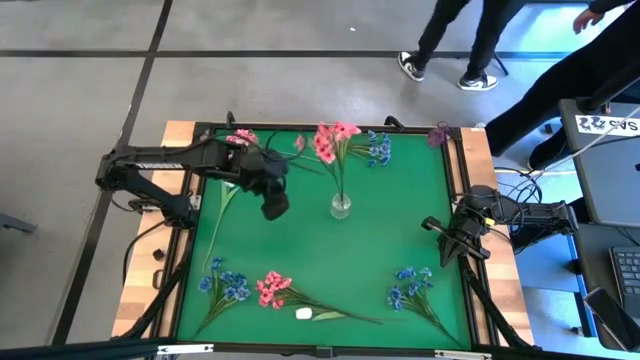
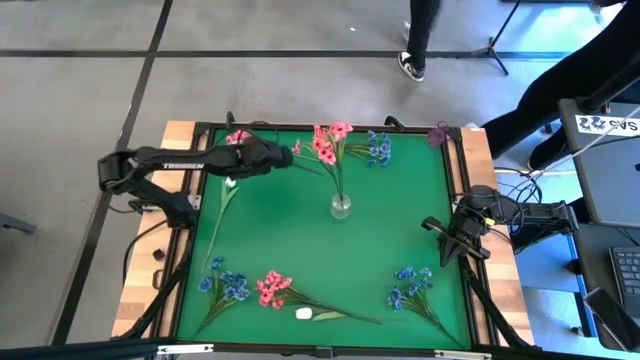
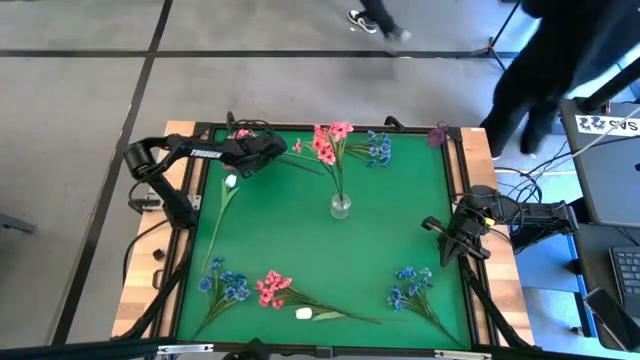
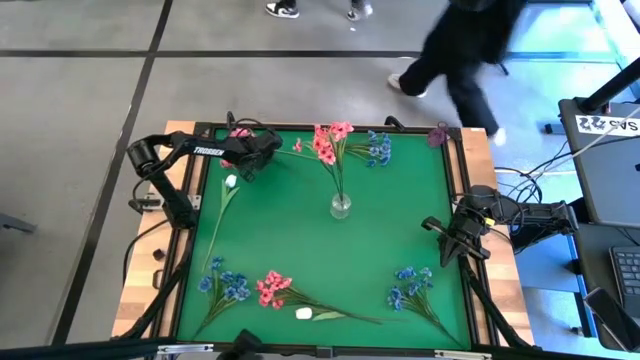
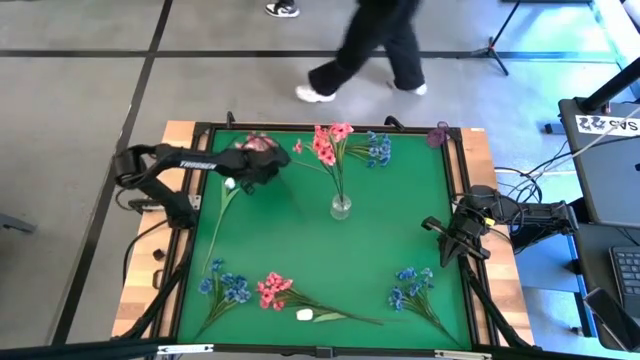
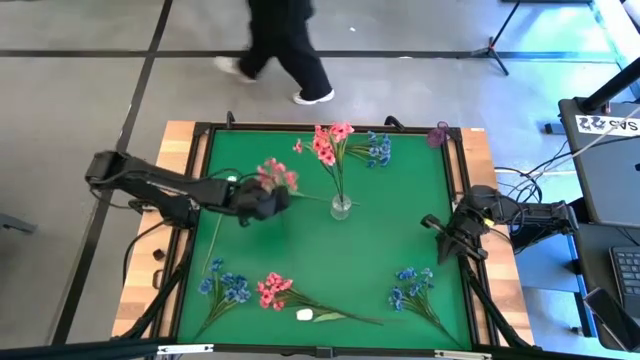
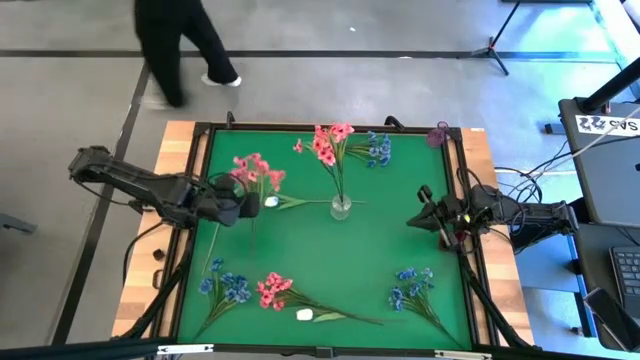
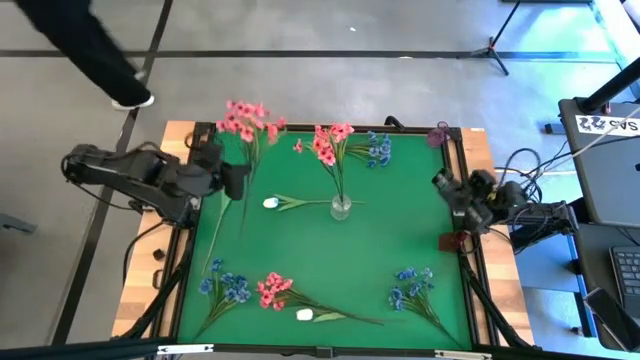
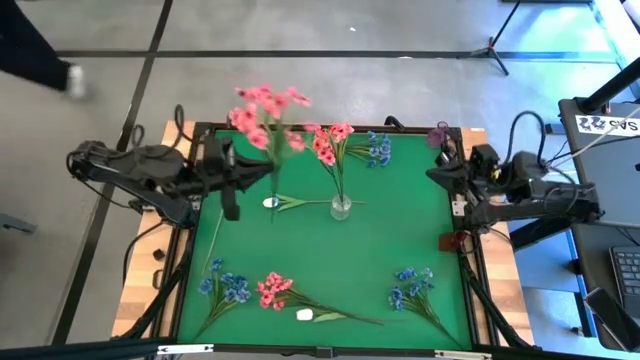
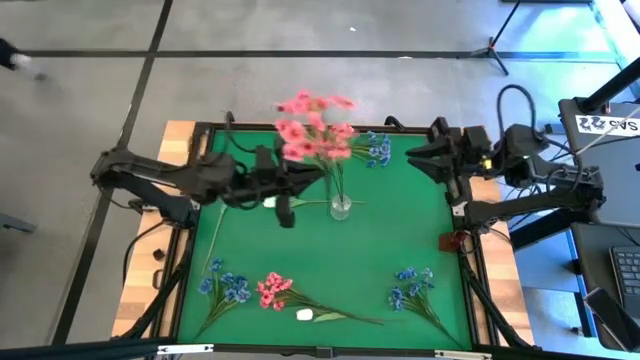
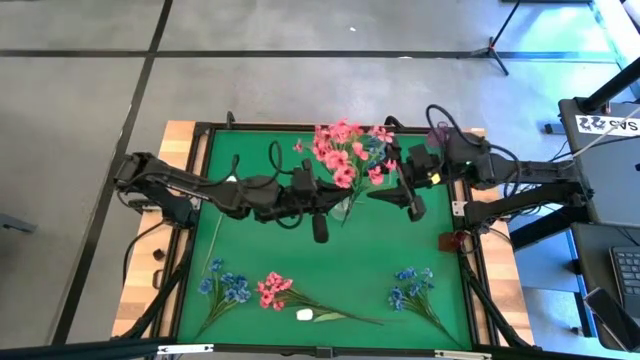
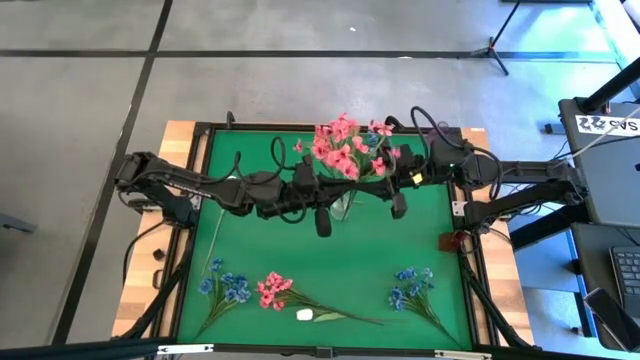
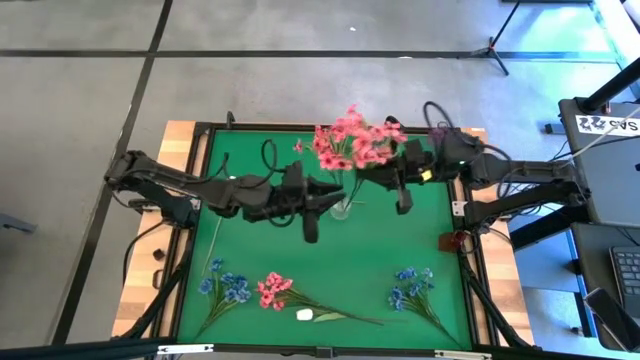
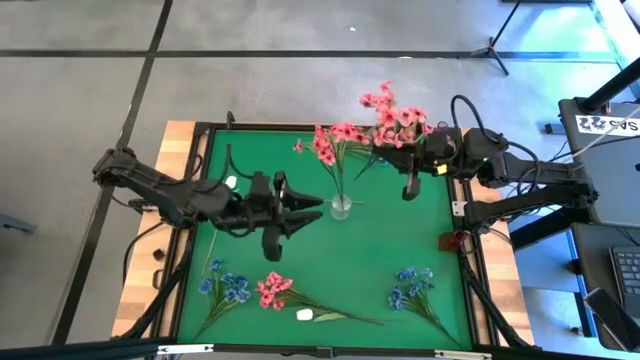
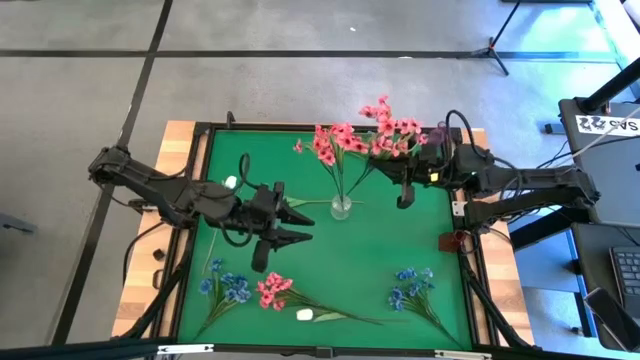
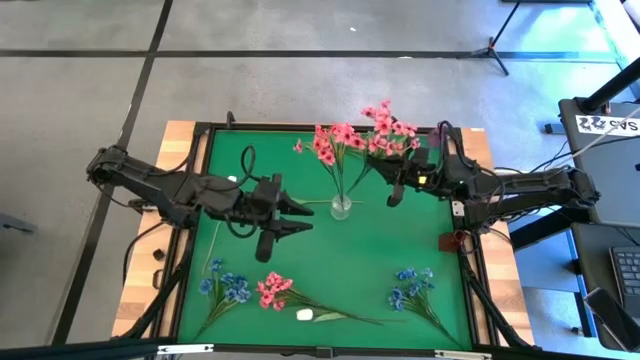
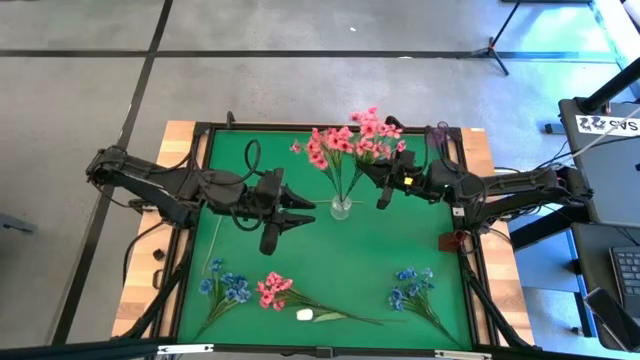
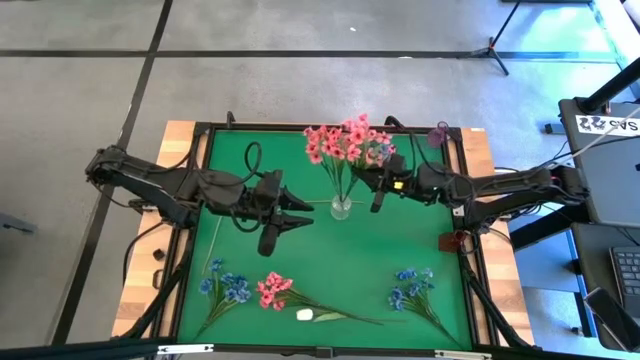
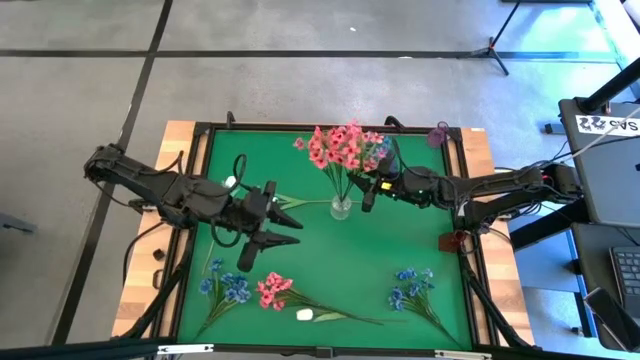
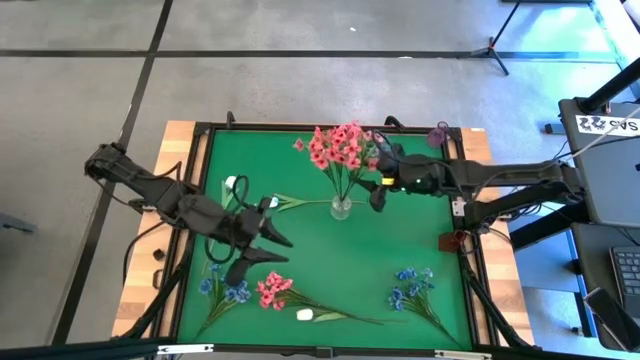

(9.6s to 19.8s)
Task: Sort flowers into vase by color
Put the top pink flowers into the transparent vase

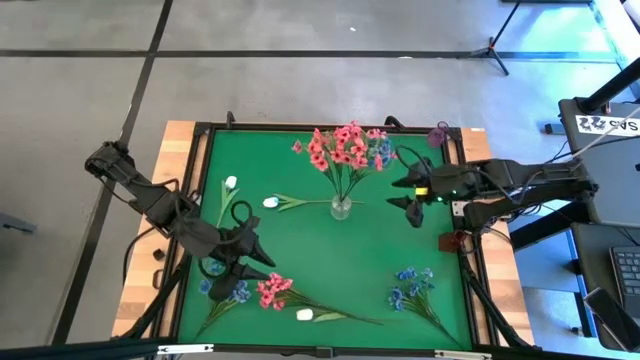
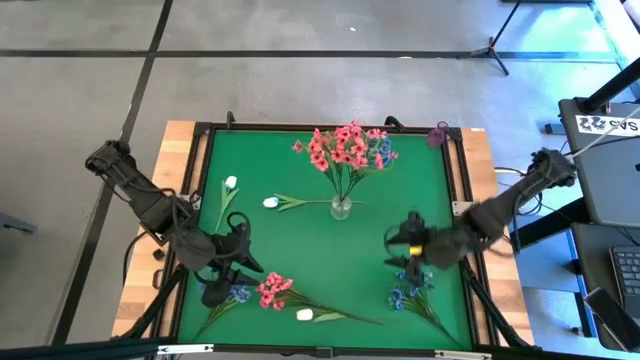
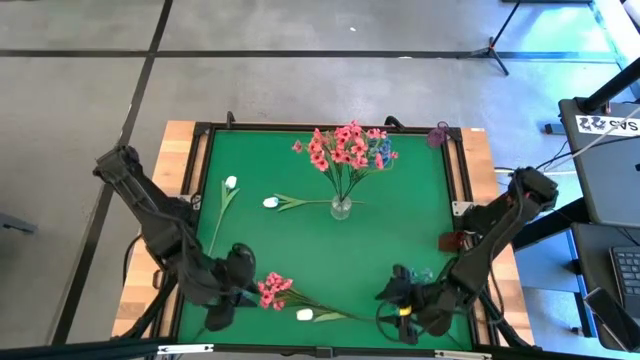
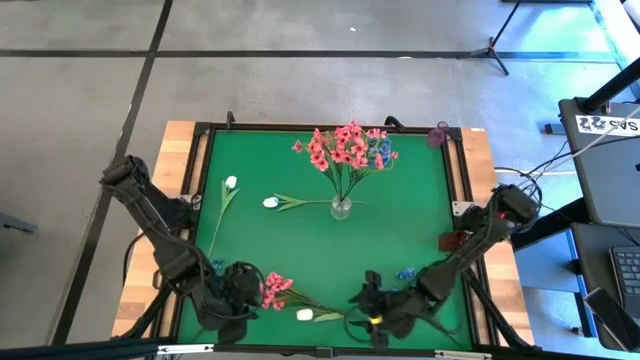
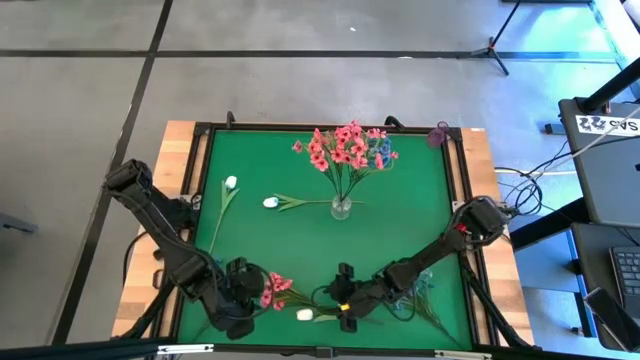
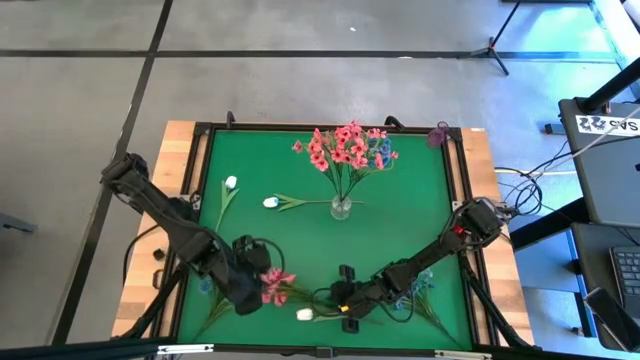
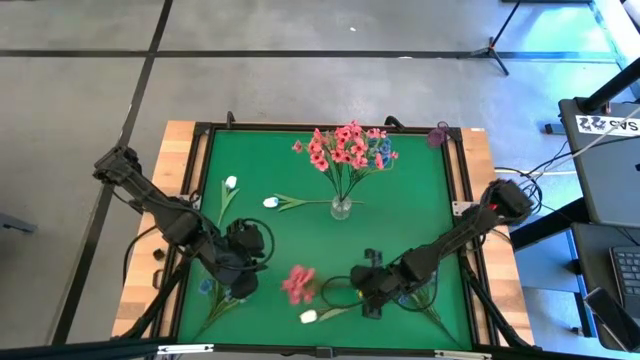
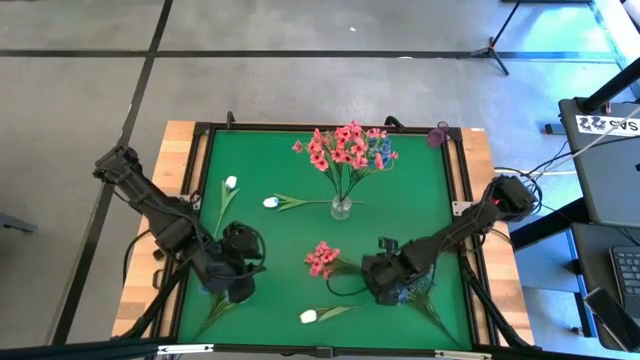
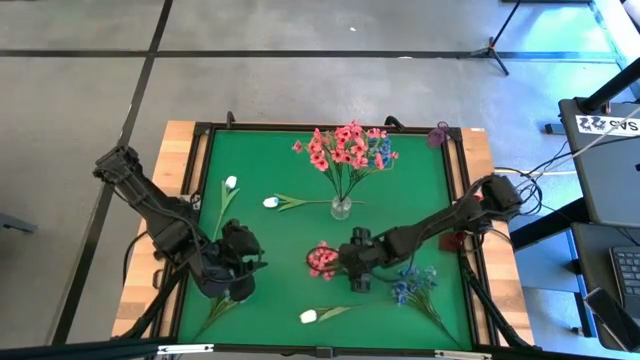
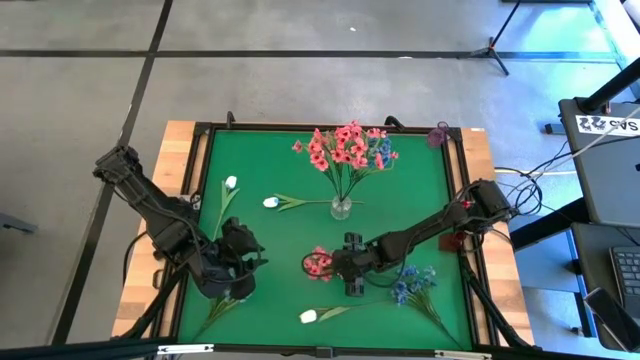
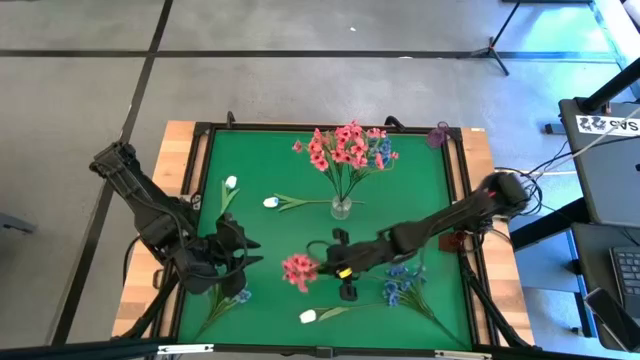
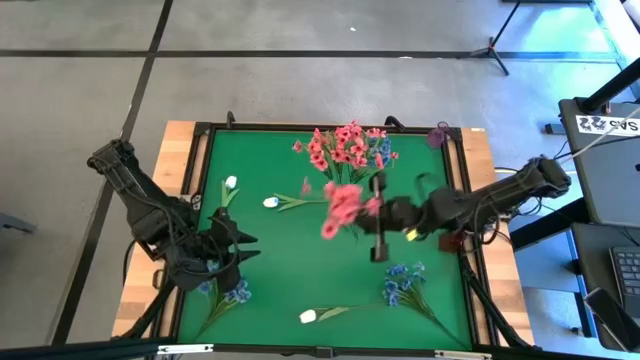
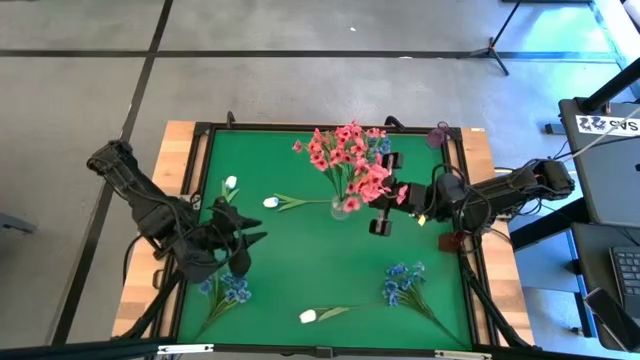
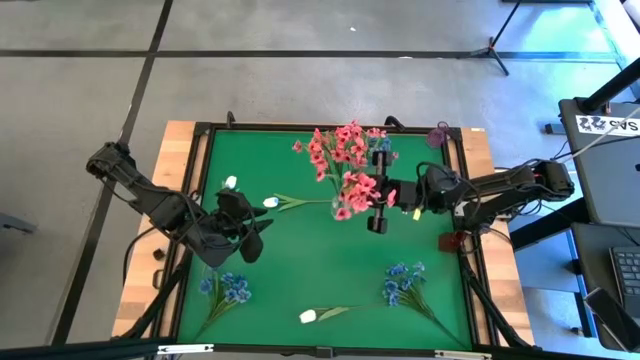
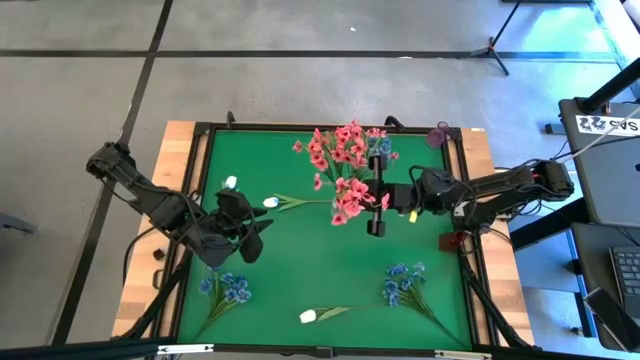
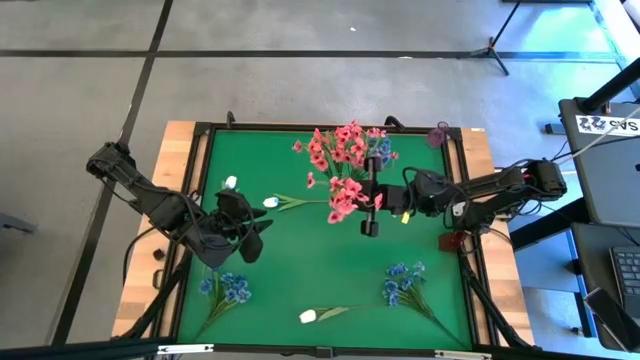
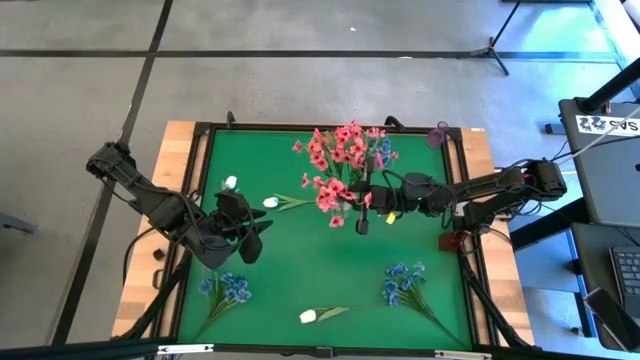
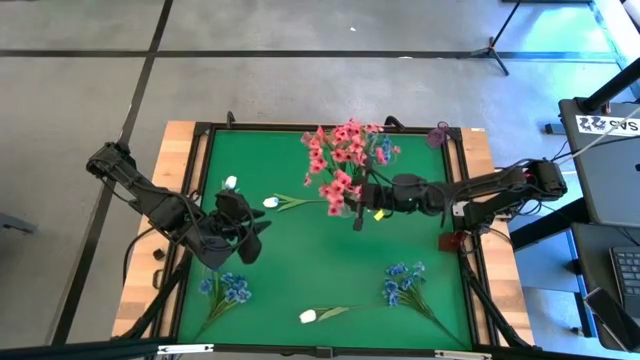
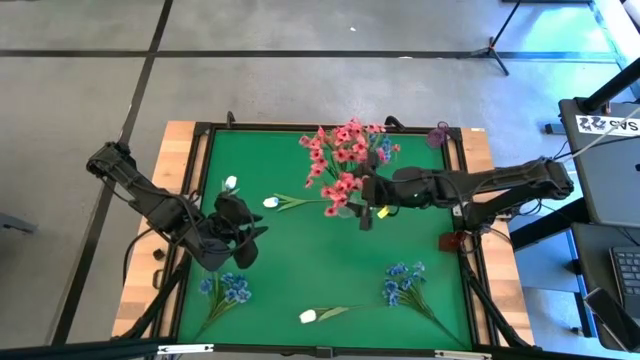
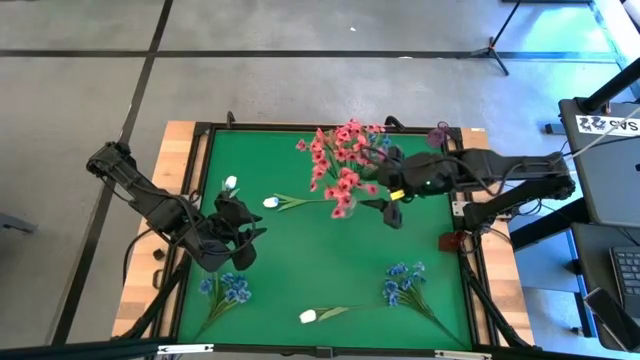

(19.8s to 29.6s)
Put the pink flowers into the transparent vase
